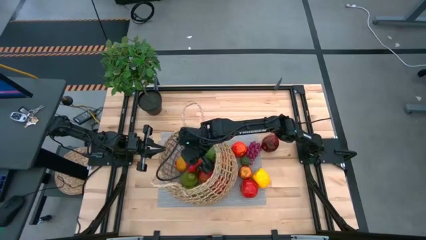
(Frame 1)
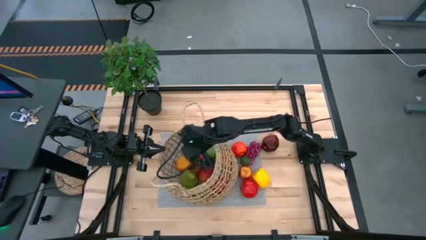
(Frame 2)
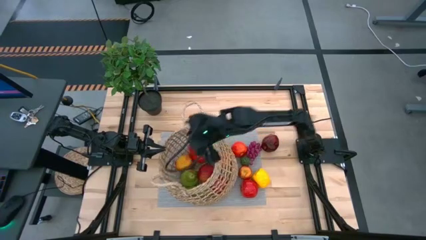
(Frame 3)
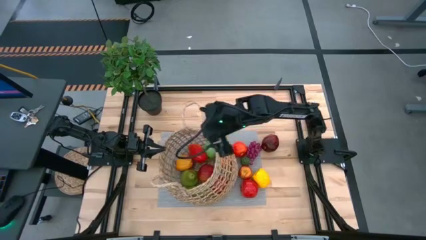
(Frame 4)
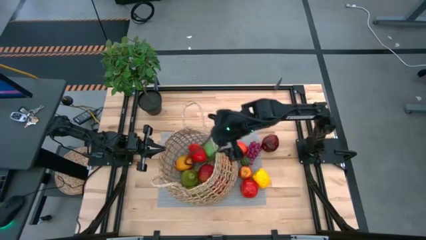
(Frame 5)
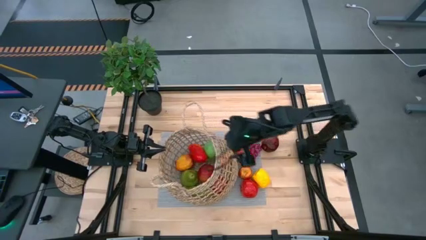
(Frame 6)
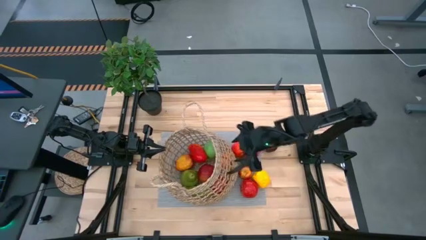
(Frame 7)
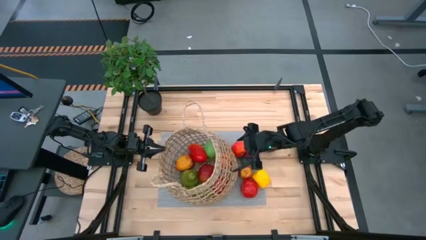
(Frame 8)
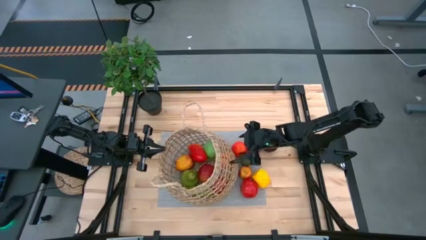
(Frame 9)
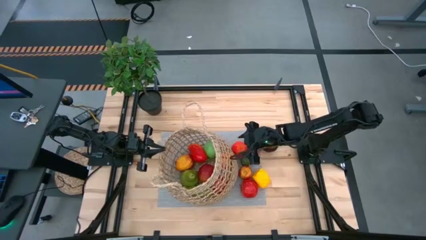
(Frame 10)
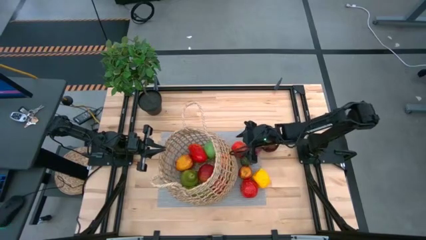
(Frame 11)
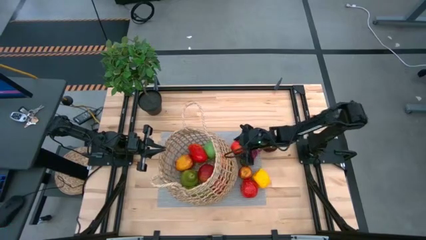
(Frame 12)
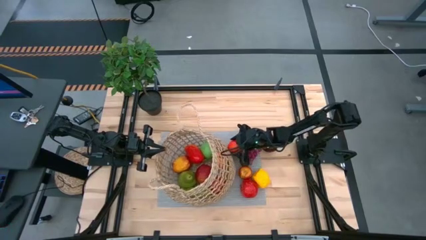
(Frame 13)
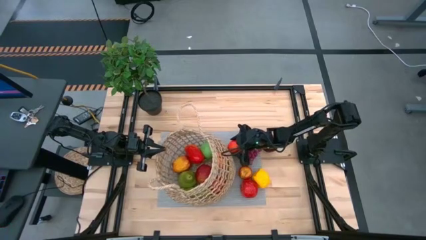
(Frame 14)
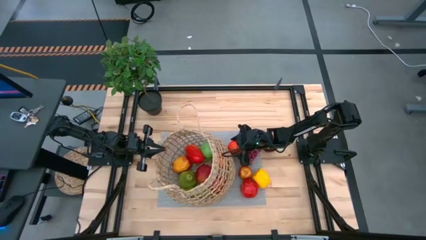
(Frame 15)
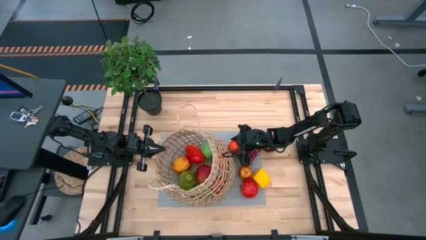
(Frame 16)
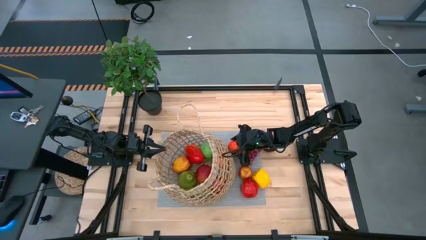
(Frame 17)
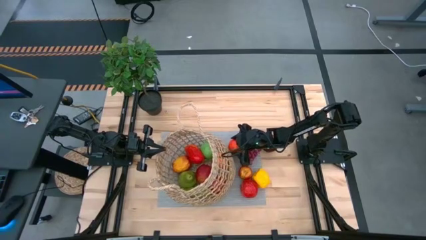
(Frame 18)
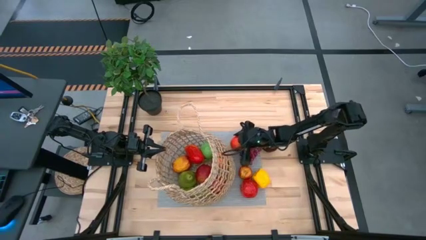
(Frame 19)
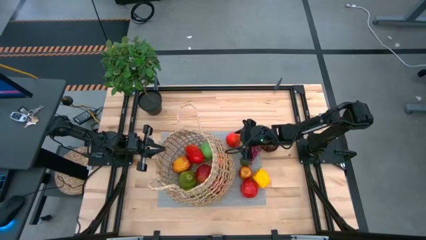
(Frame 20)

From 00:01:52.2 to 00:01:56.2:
Task: Build produce basket
Put the red apple into the brown basket

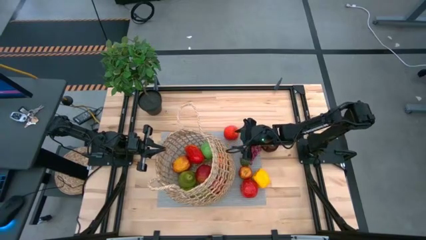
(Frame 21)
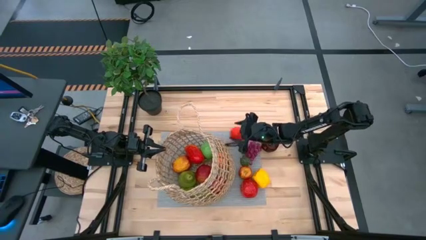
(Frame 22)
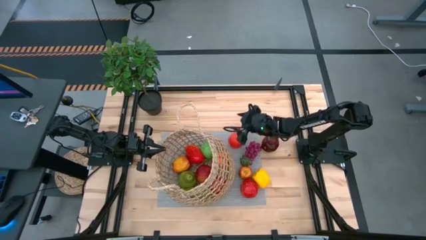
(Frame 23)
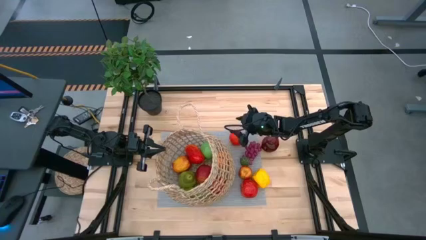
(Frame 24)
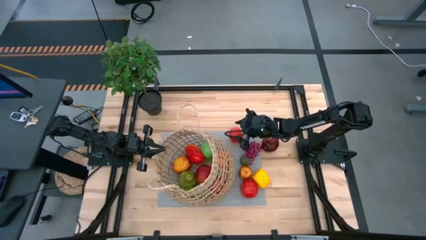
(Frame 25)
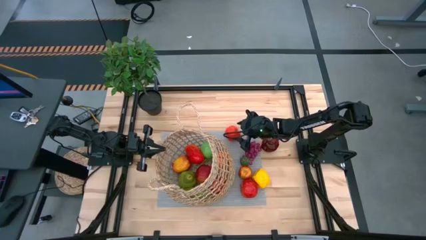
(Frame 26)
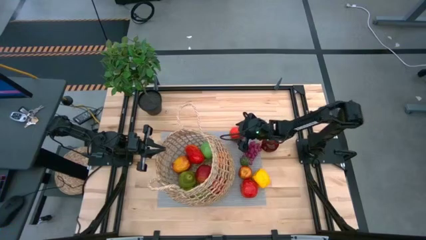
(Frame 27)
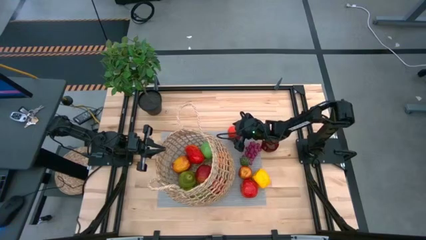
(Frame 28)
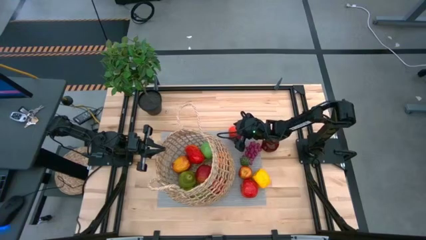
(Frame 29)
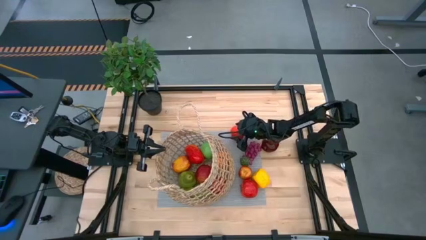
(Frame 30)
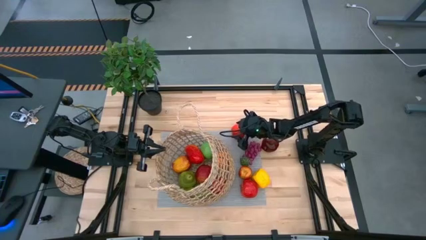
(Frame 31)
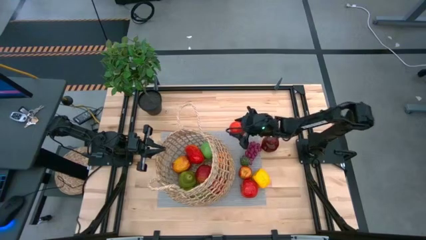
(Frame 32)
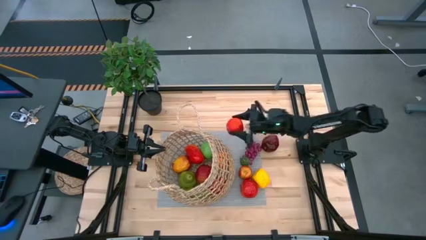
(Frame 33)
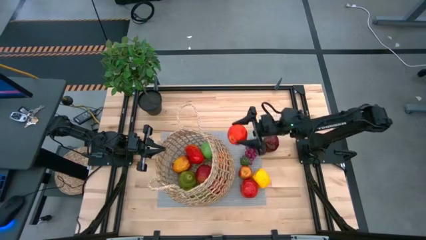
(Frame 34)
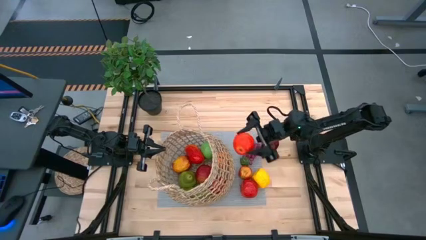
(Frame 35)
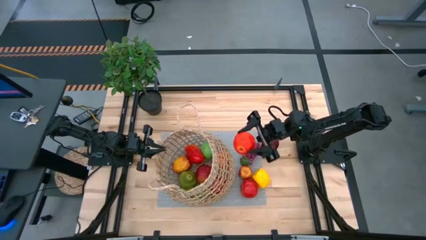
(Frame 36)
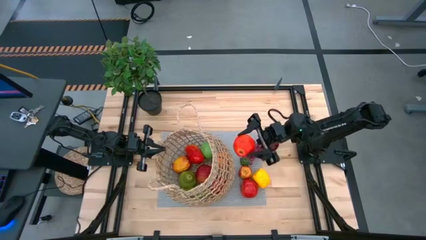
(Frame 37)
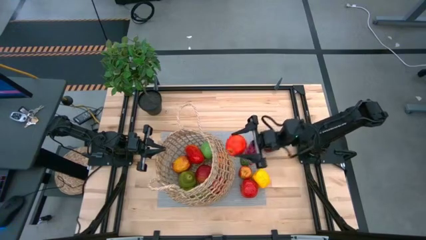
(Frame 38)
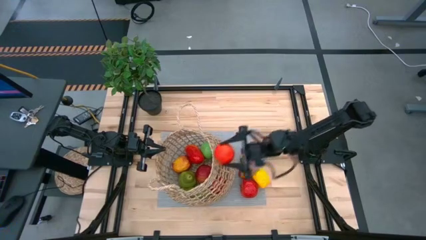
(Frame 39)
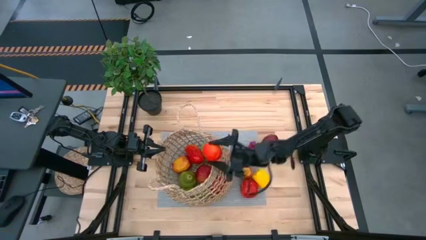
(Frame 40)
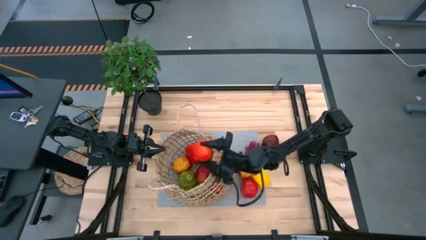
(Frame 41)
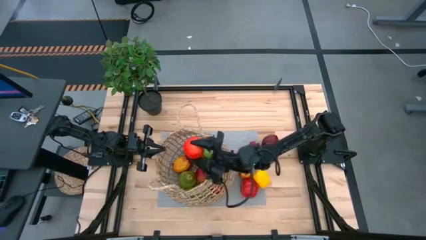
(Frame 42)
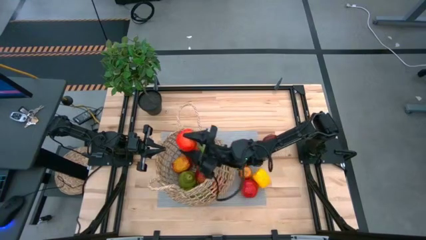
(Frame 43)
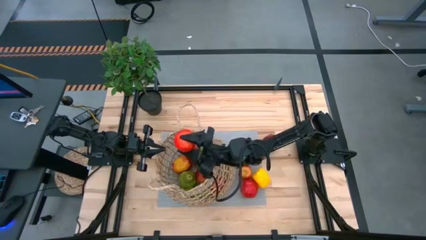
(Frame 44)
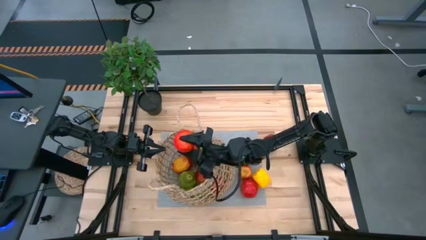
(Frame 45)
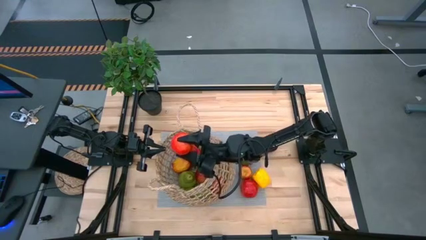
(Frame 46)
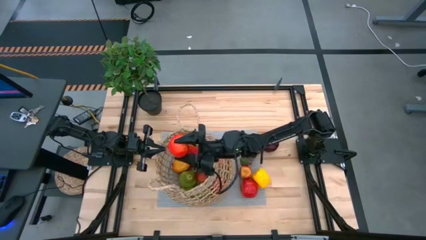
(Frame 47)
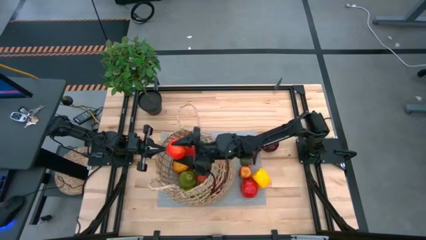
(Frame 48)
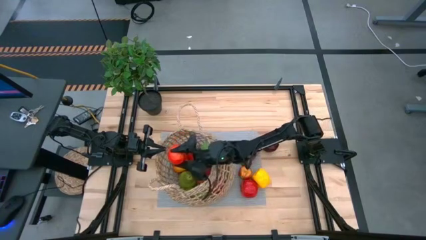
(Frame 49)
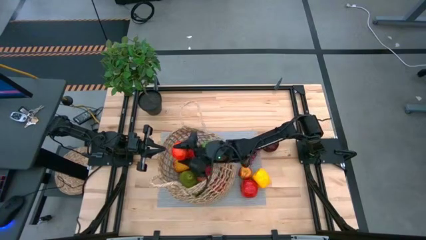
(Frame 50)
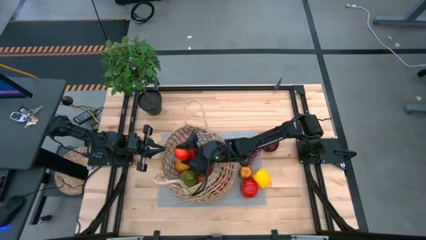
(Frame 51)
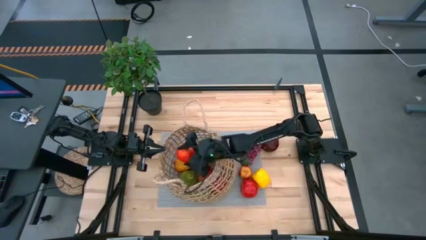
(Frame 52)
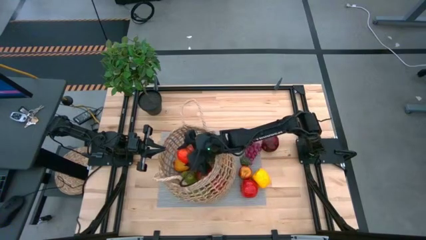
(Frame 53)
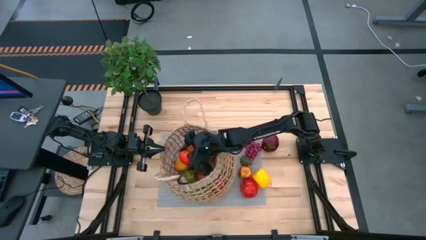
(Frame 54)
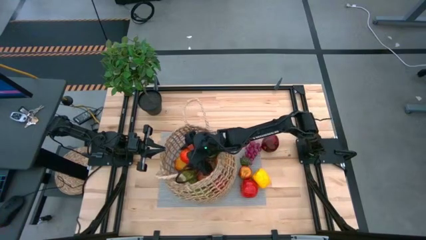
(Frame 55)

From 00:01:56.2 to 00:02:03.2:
Put the red apple into the brown basket

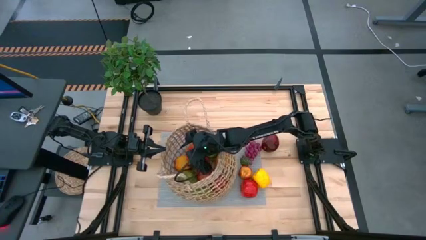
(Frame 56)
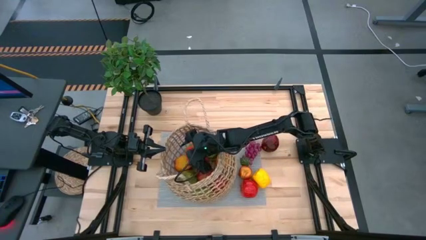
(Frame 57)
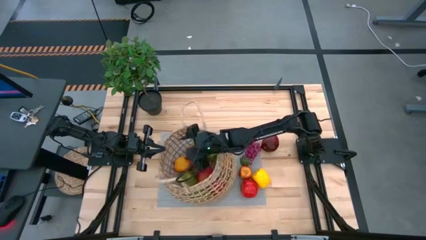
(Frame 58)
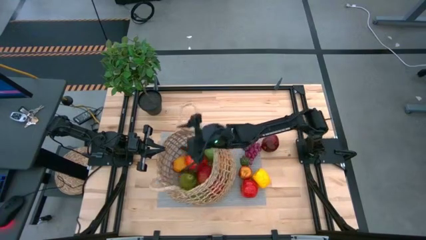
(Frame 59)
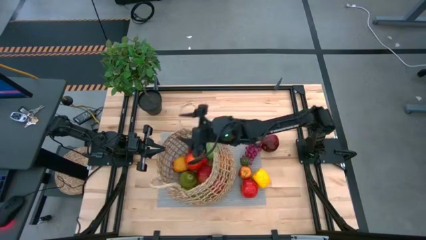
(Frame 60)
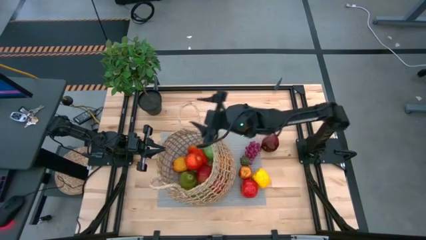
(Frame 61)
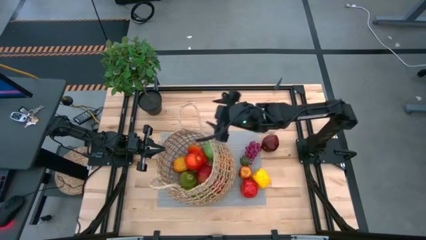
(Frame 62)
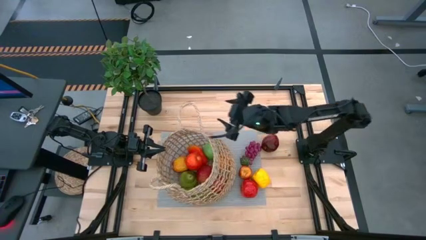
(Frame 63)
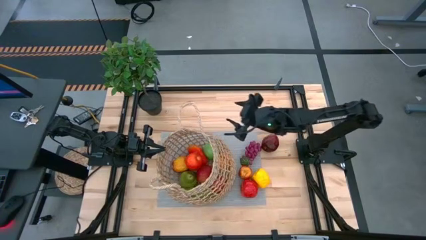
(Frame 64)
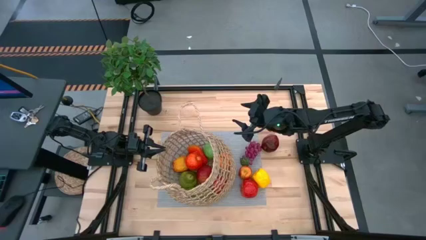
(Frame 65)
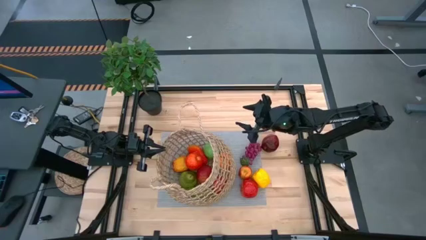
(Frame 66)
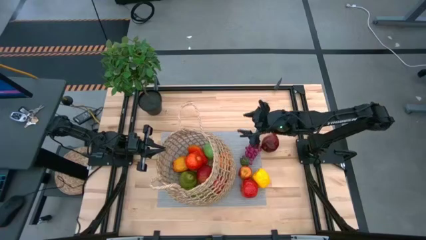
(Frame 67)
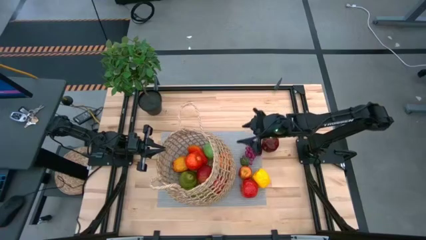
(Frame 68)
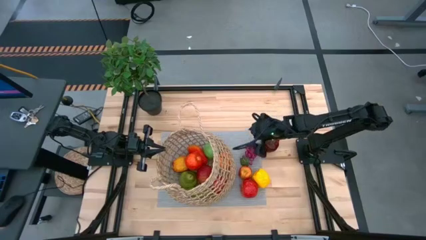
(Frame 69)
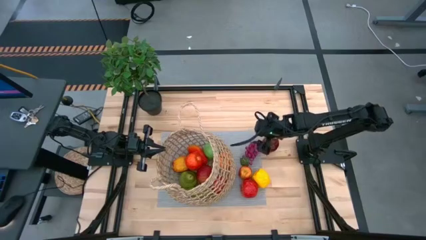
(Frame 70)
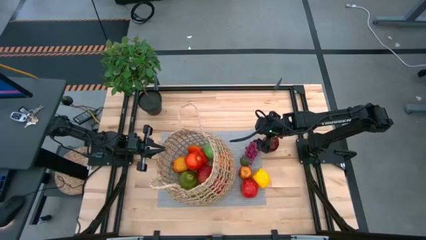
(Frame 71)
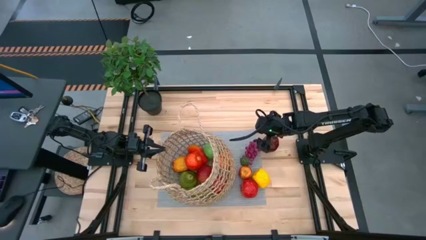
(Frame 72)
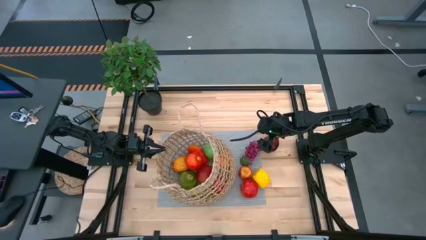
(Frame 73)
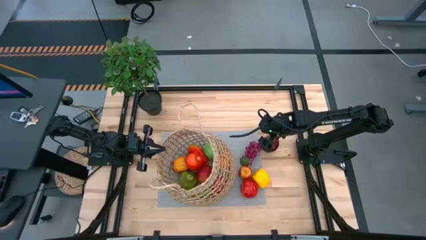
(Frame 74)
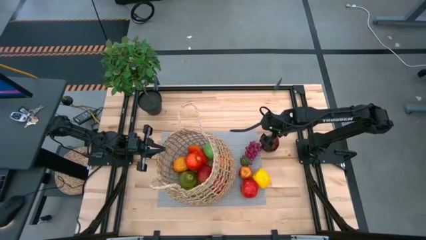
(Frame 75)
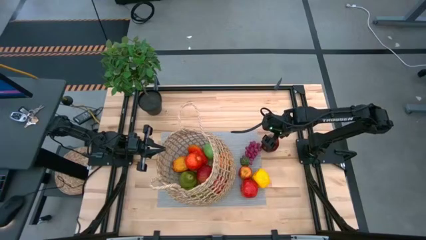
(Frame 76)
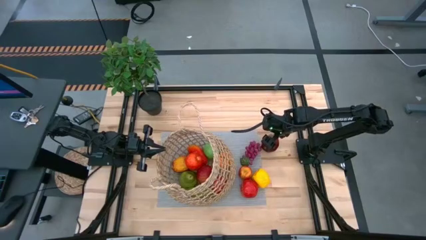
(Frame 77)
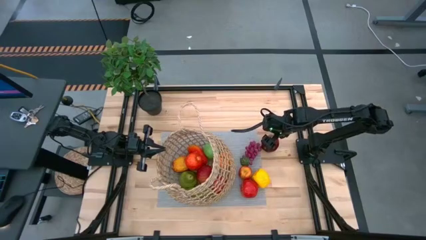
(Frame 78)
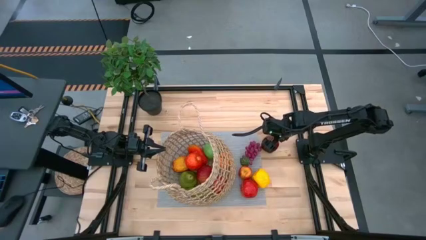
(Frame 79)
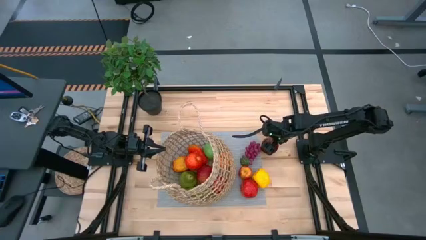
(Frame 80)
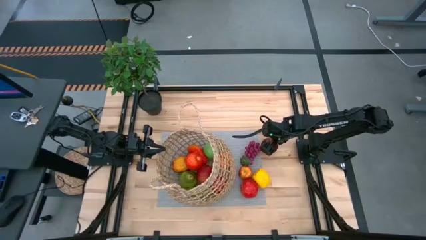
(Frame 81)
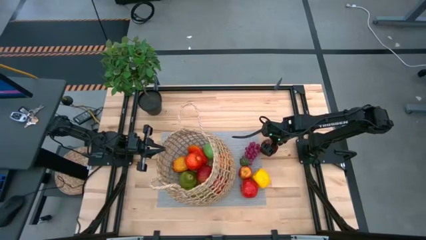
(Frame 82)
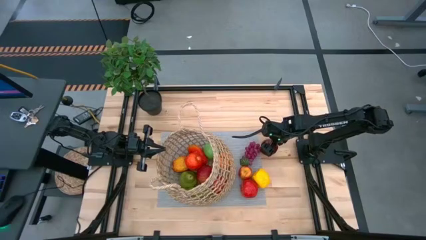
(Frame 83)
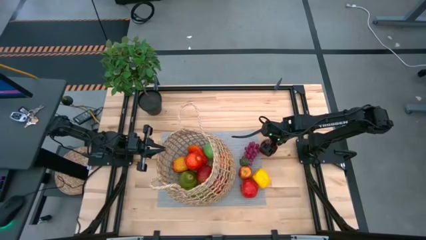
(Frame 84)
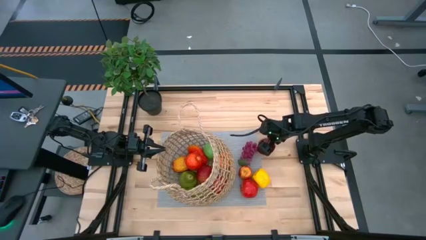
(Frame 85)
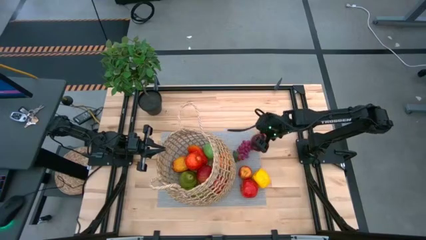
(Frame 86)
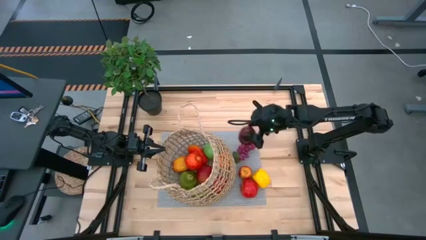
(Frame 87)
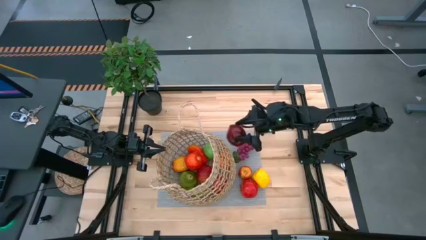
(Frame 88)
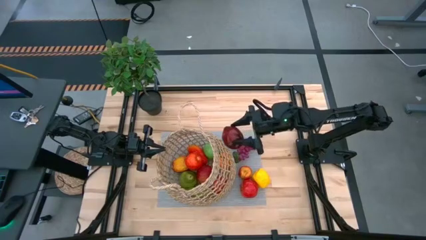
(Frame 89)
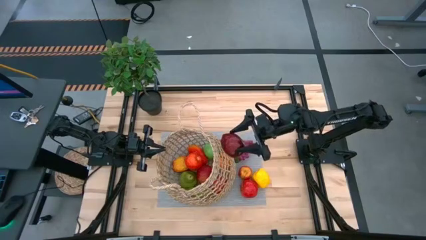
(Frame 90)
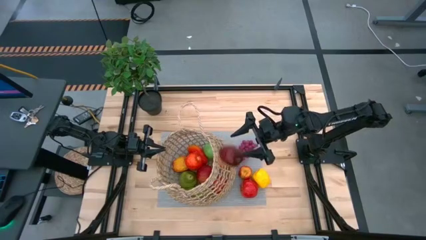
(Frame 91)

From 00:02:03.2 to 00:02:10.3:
Put the red apple into the brown basket
